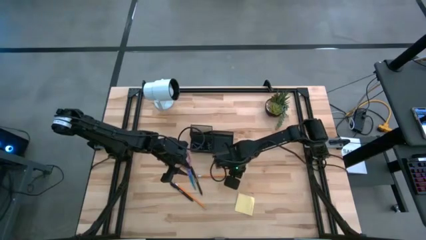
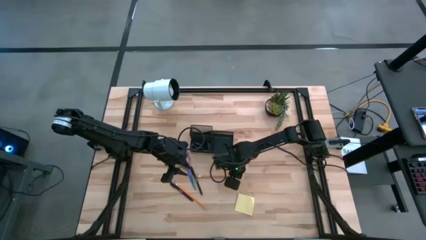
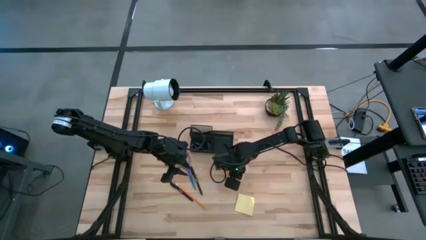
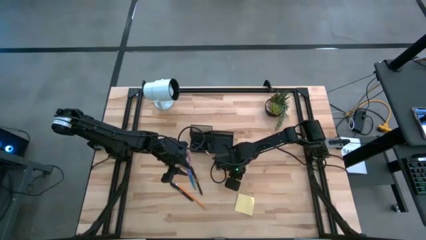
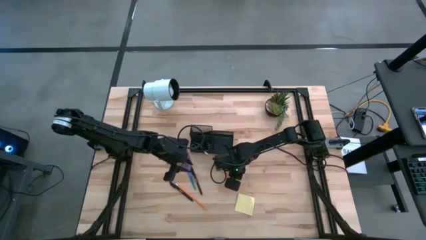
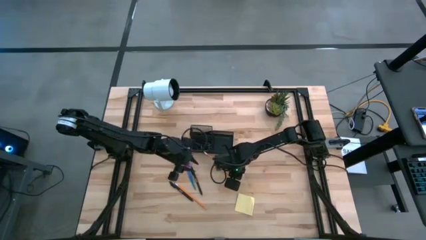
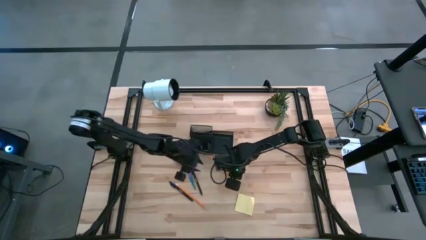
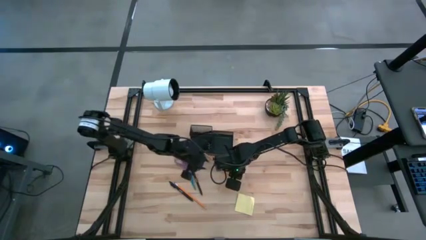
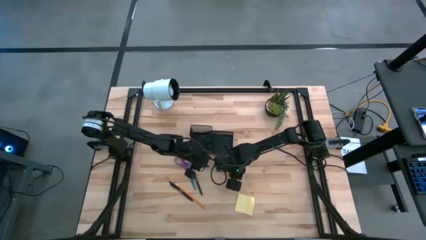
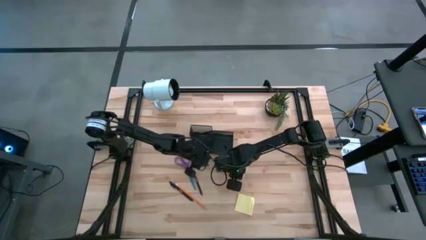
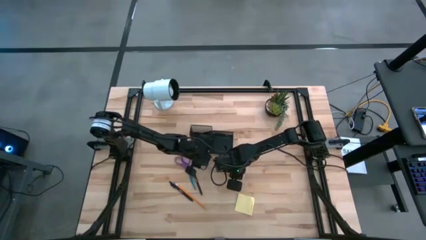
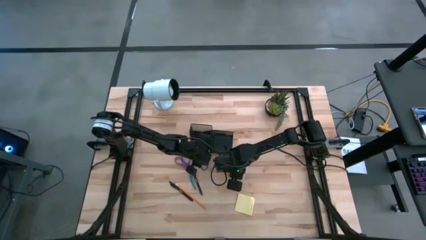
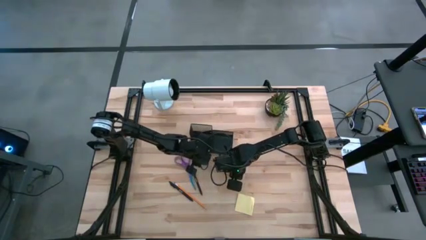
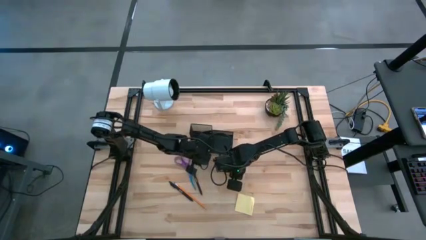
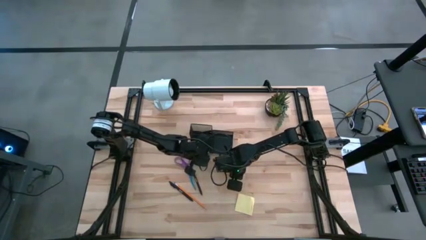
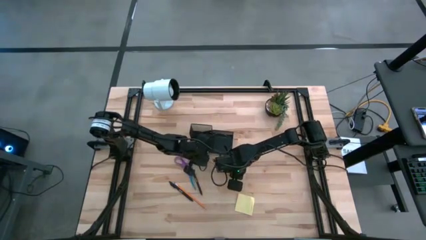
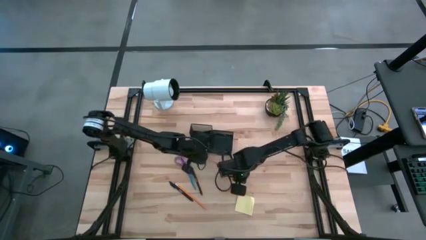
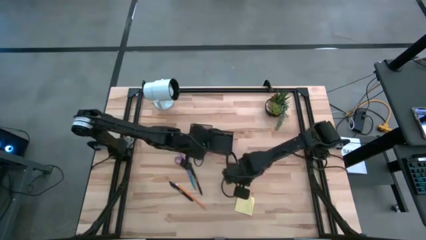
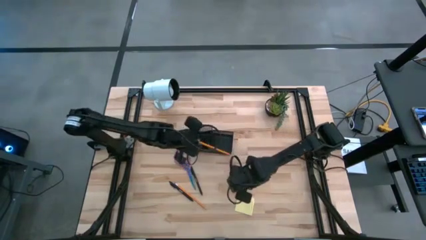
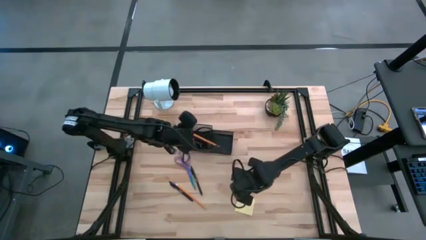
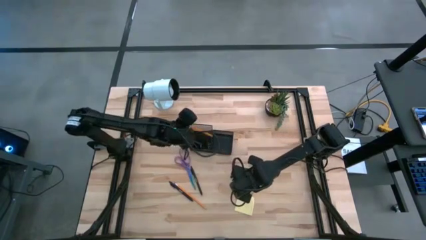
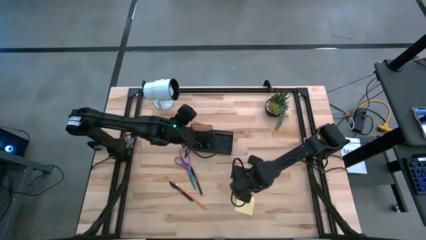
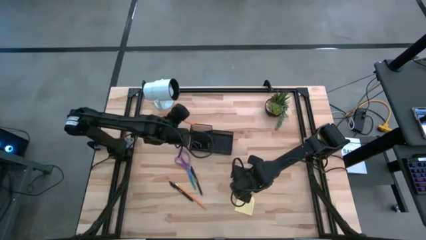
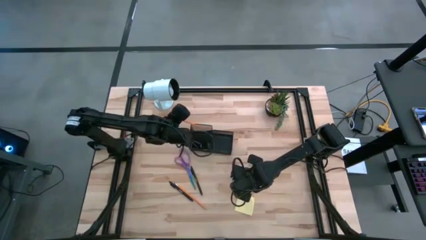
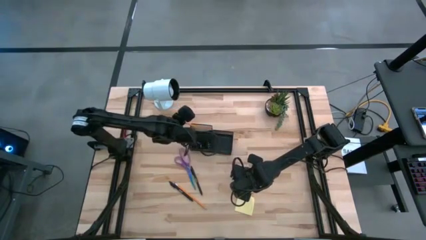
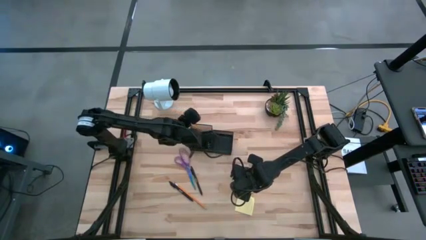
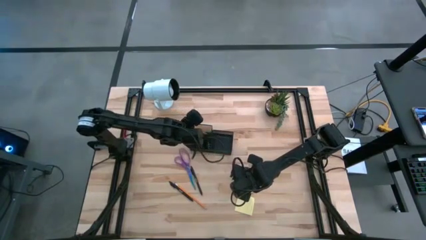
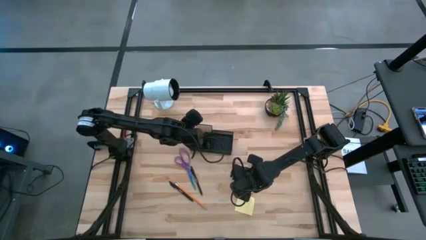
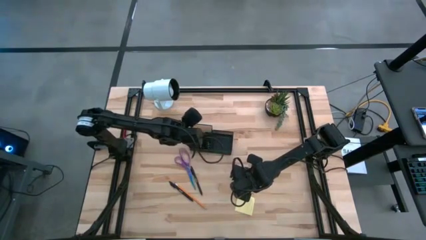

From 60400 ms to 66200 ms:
Task: Pick and place office supplies into organizer
Put the top yellow pencil into the black desk organizer

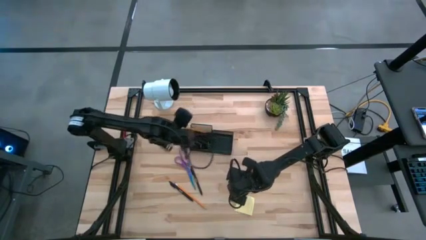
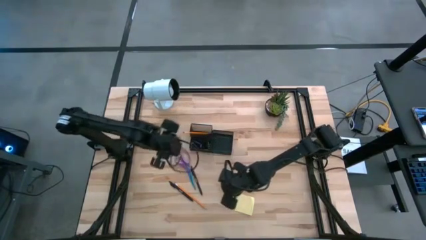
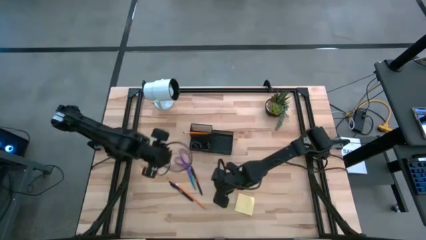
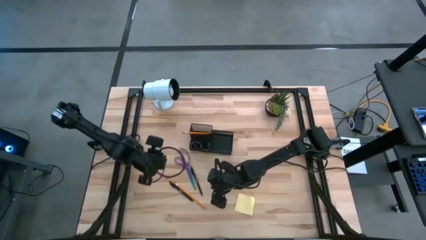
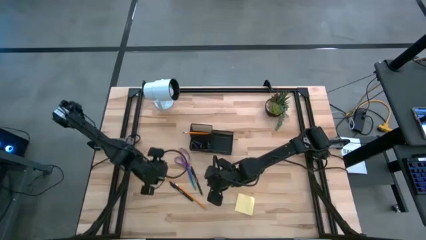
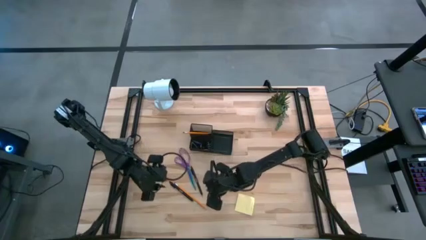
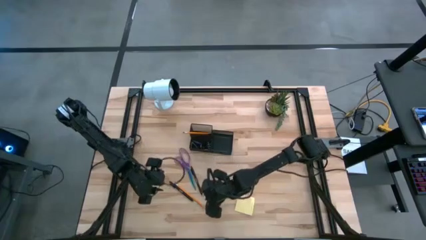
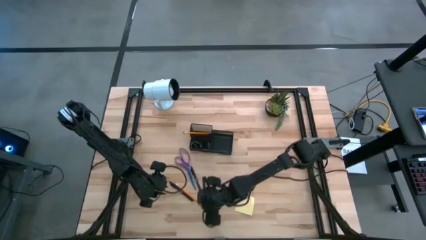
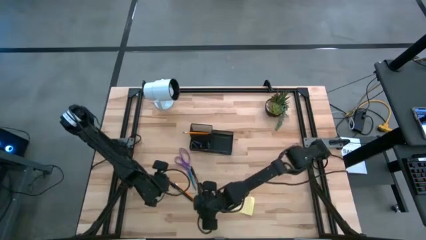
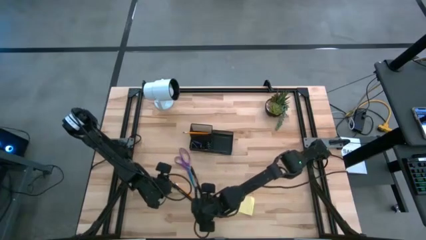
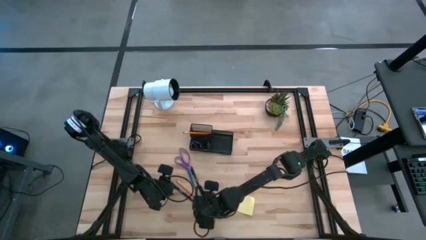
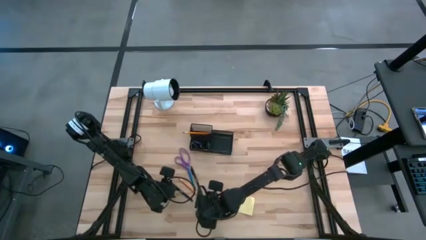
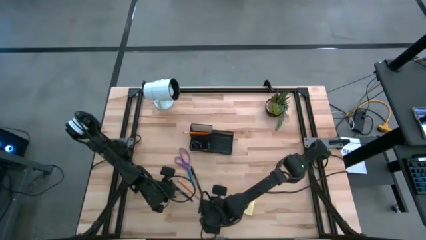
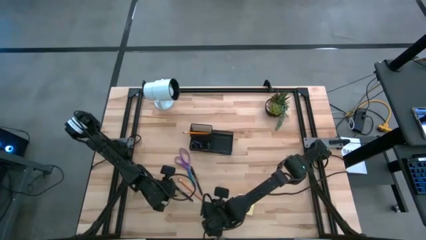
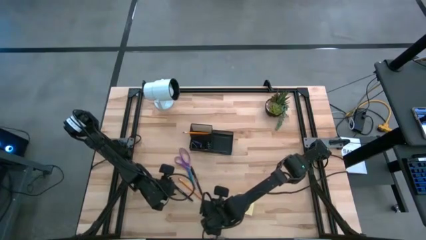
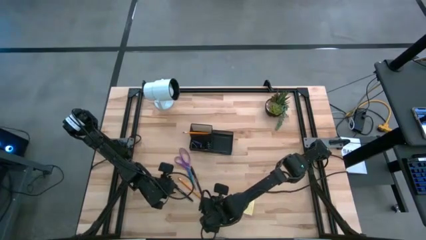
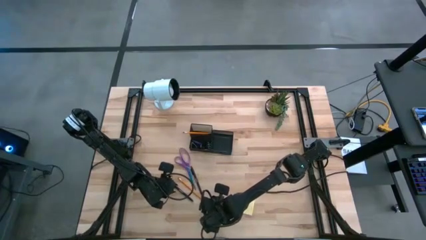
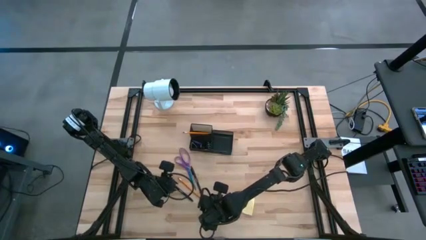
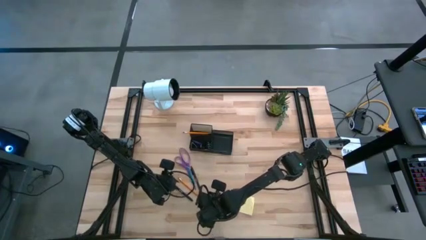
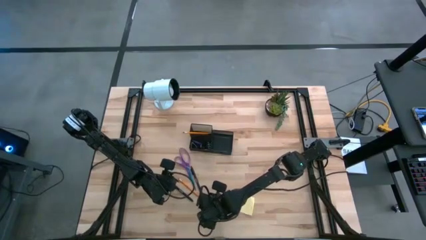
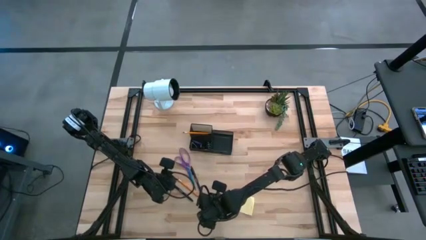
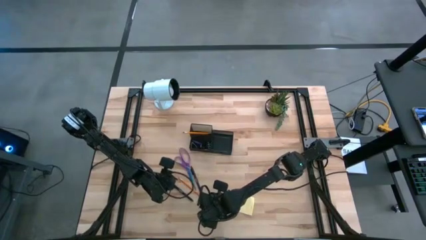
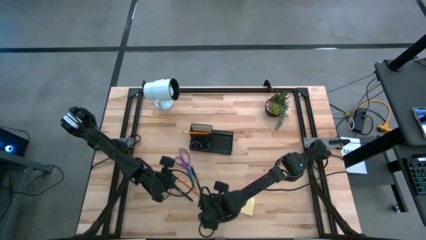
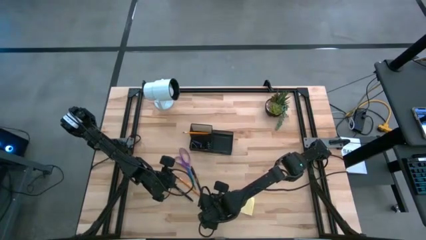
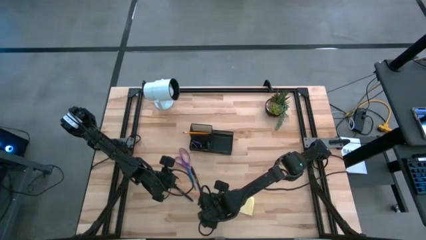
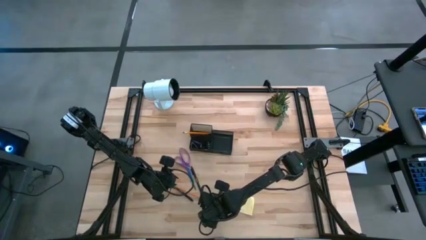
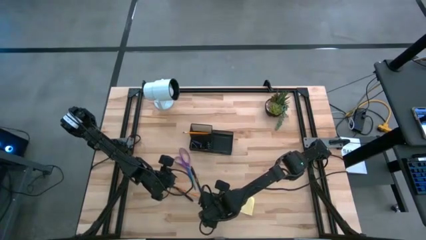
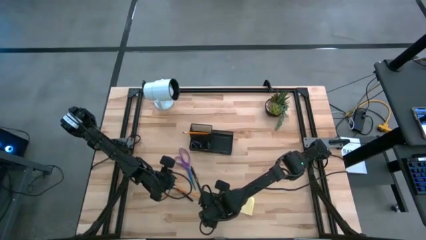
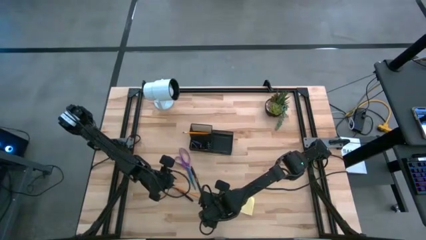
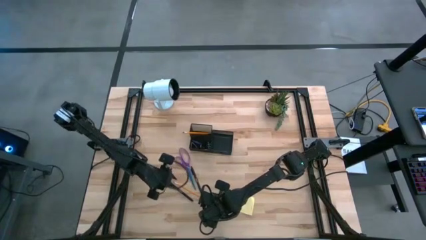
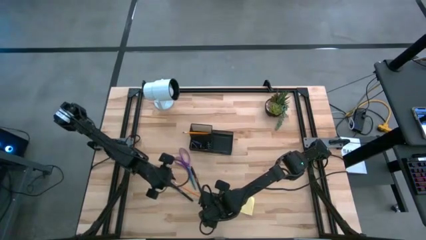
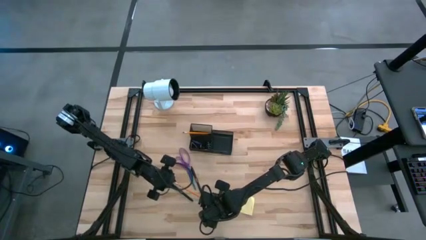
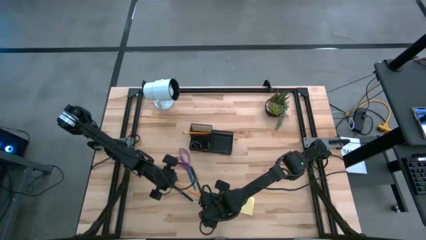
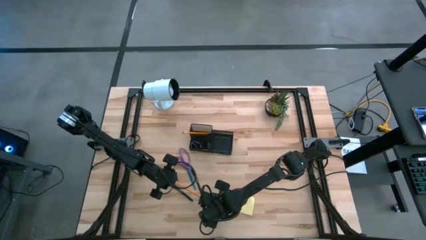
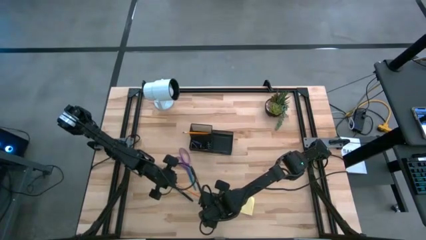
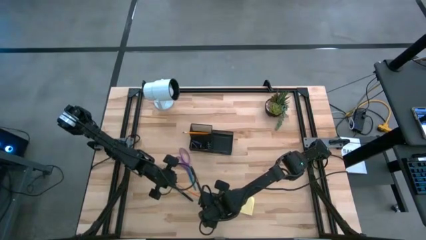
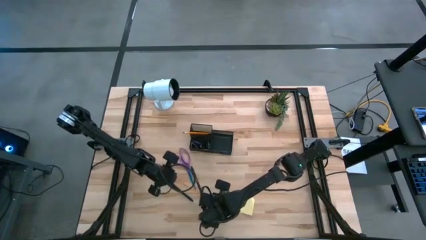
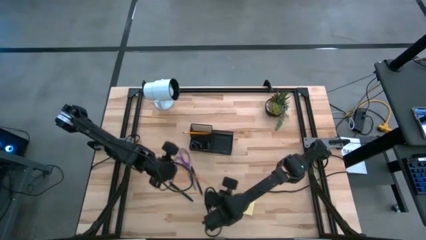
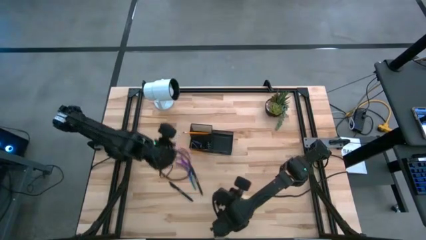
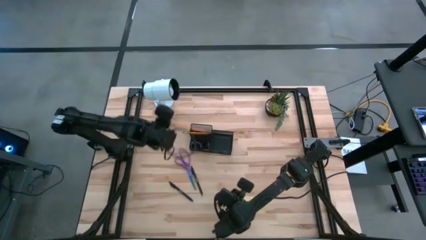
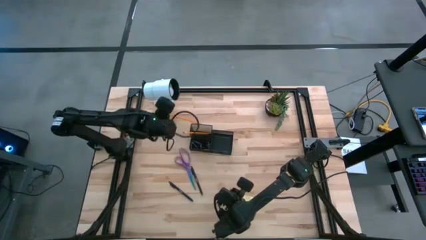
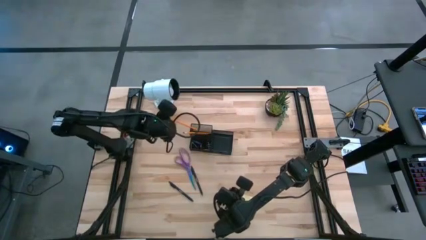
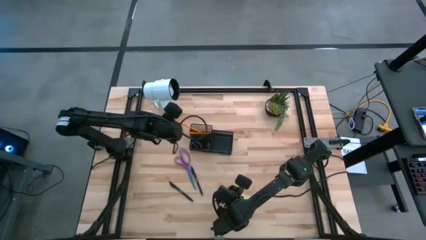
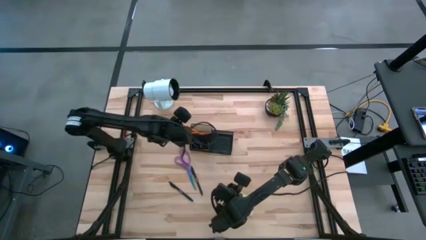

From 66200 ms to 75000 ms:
Put the top yellow pencil into the black desk organizer
